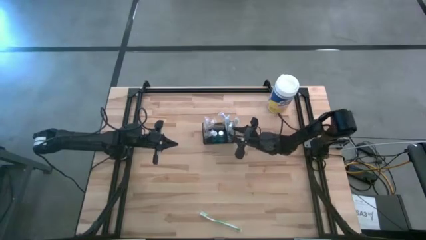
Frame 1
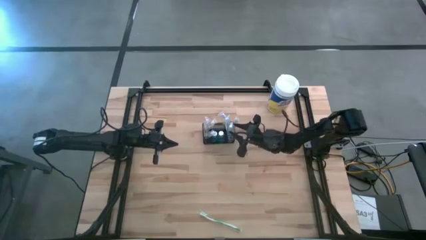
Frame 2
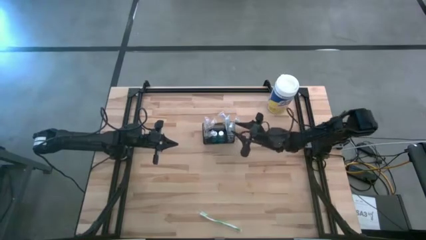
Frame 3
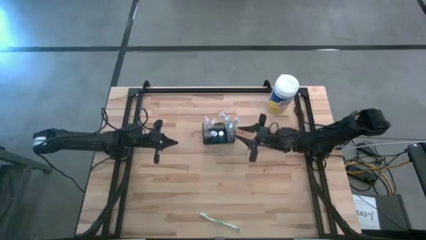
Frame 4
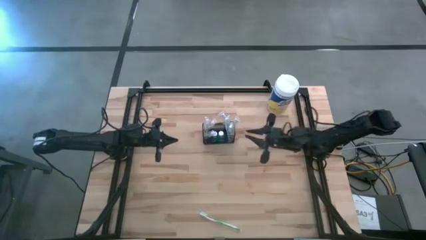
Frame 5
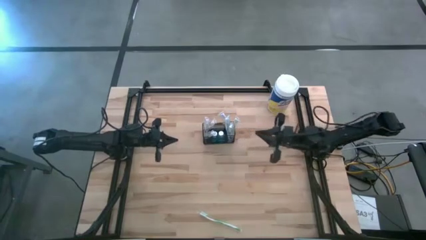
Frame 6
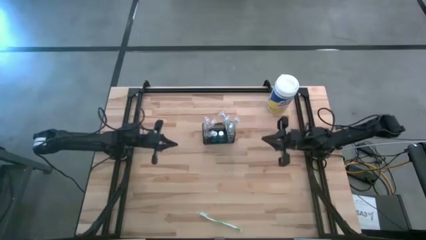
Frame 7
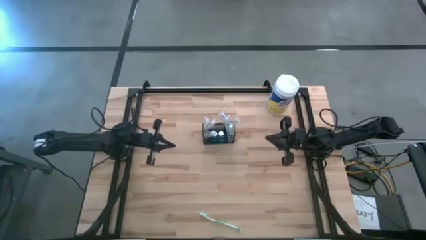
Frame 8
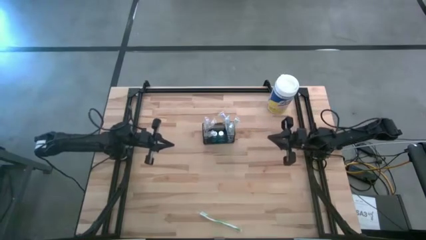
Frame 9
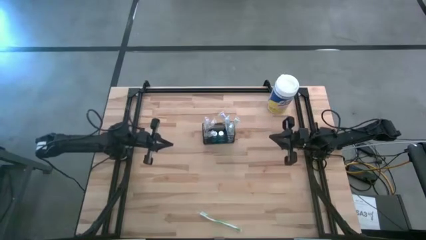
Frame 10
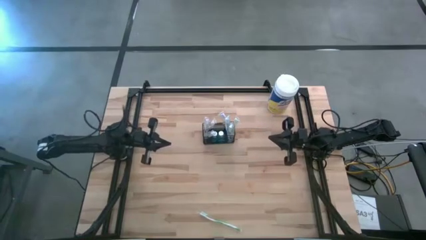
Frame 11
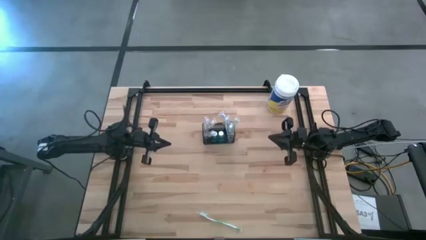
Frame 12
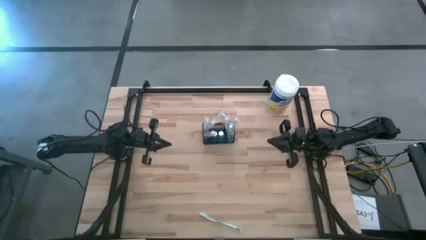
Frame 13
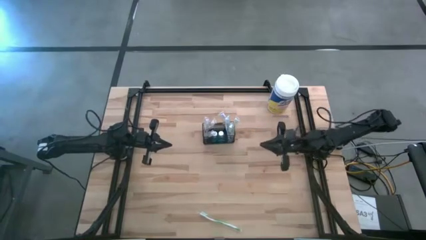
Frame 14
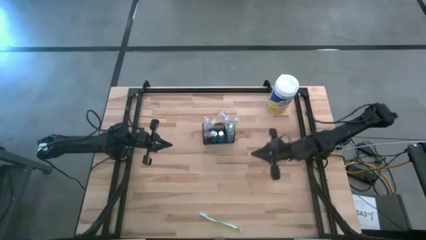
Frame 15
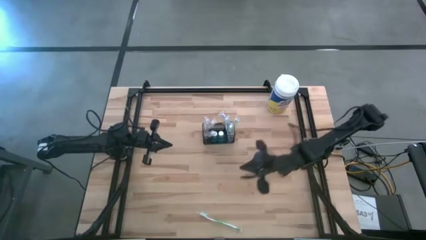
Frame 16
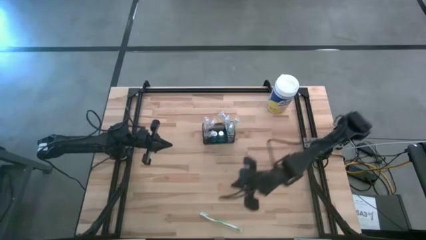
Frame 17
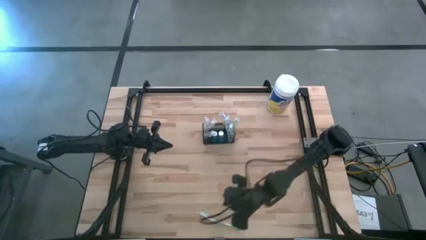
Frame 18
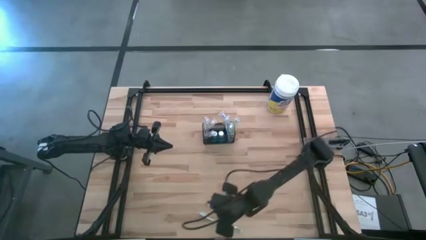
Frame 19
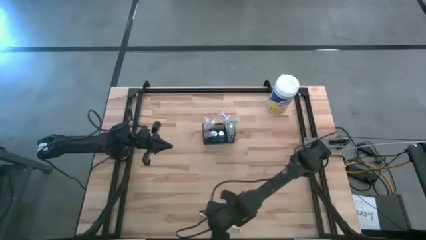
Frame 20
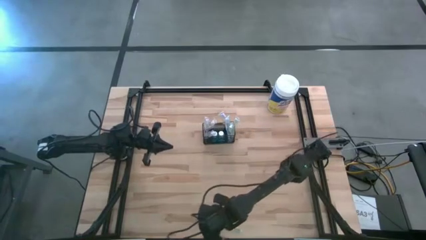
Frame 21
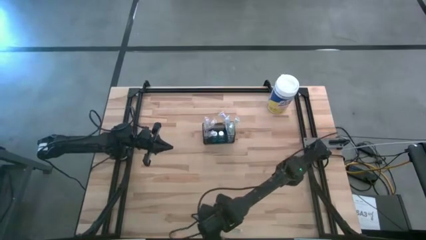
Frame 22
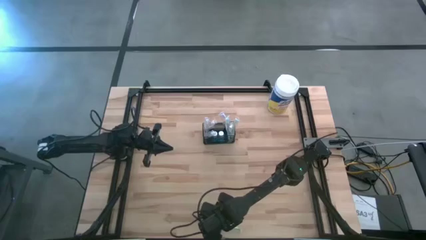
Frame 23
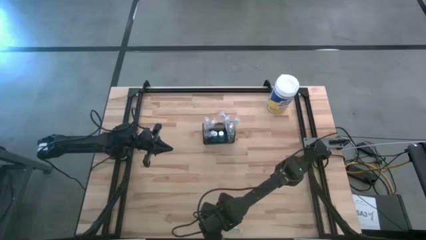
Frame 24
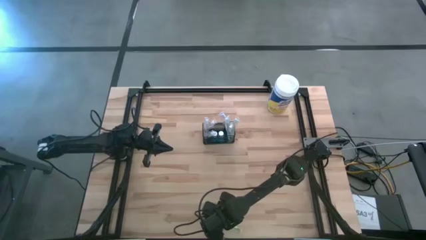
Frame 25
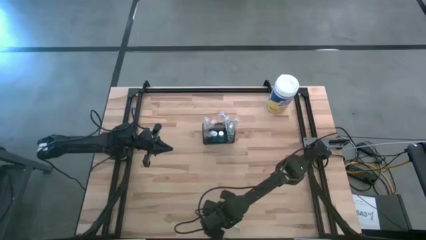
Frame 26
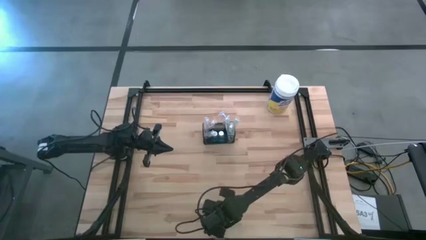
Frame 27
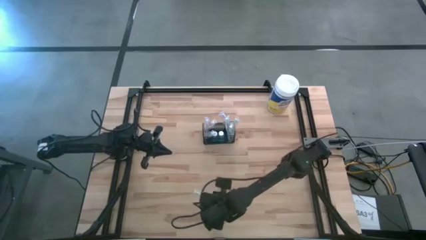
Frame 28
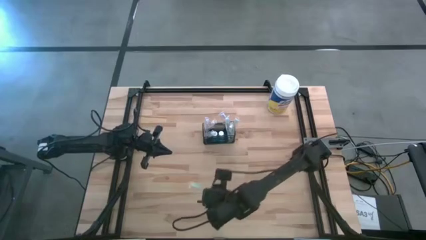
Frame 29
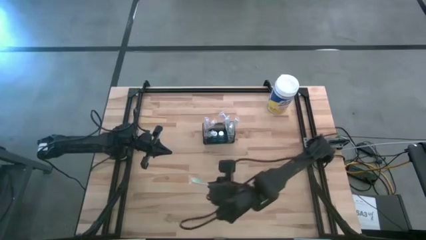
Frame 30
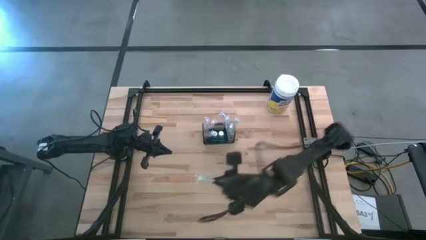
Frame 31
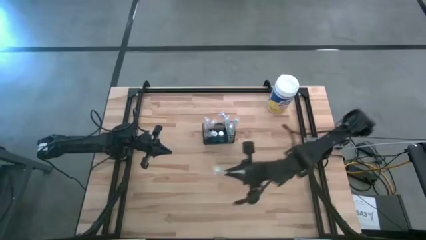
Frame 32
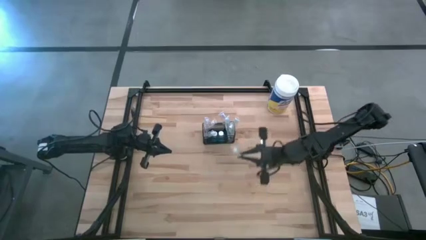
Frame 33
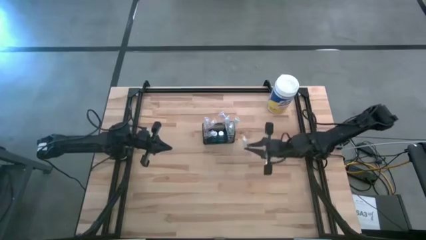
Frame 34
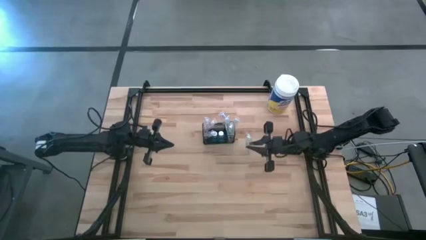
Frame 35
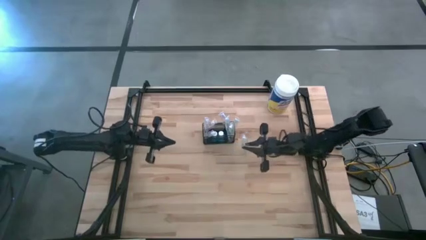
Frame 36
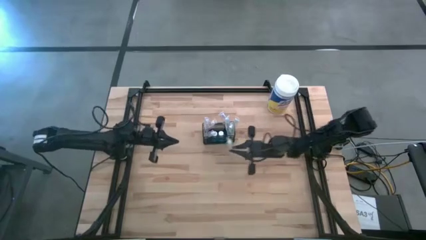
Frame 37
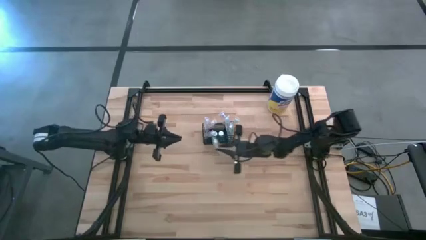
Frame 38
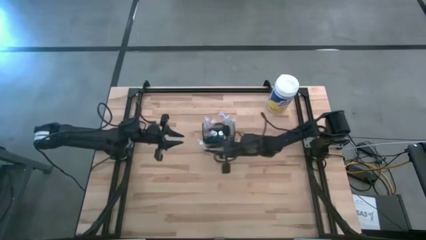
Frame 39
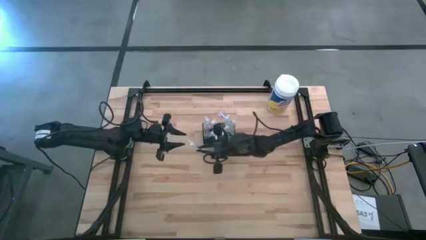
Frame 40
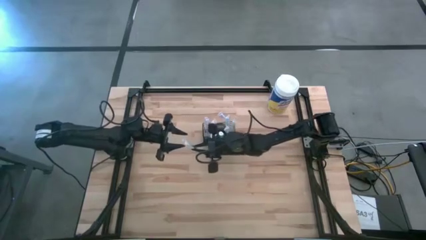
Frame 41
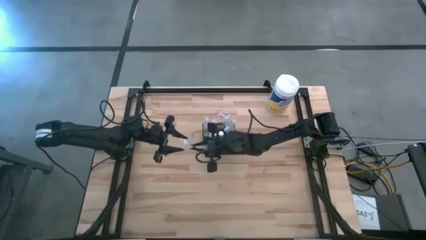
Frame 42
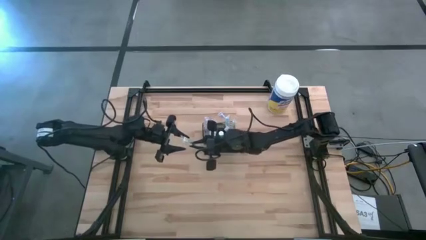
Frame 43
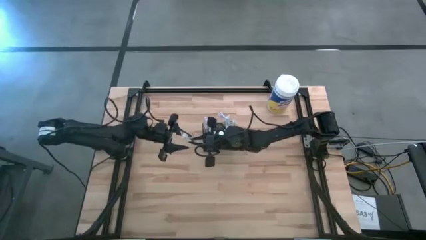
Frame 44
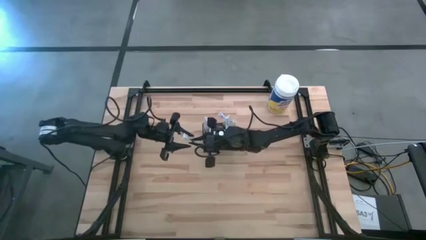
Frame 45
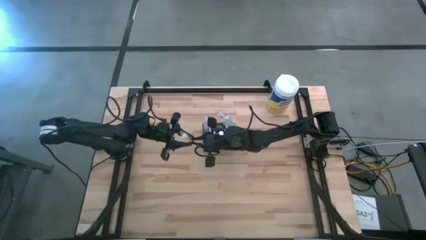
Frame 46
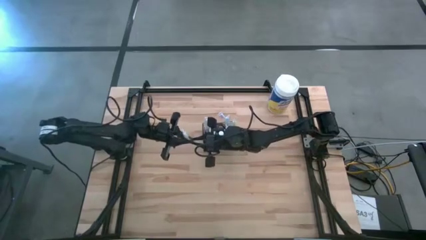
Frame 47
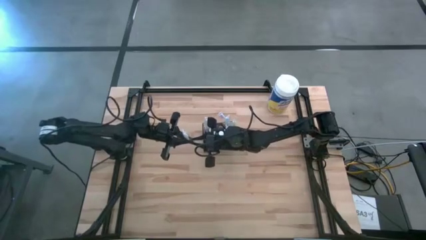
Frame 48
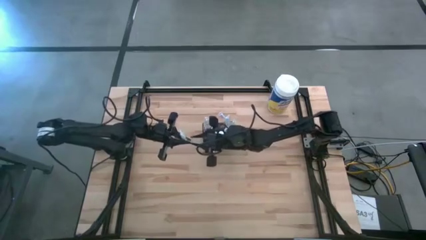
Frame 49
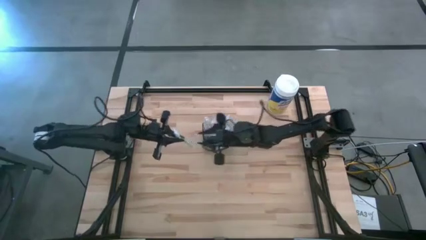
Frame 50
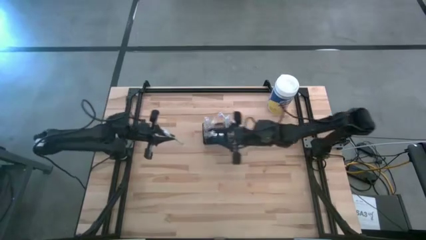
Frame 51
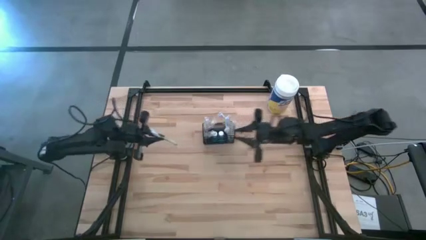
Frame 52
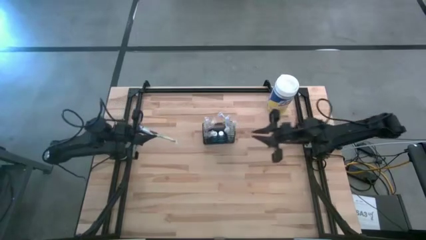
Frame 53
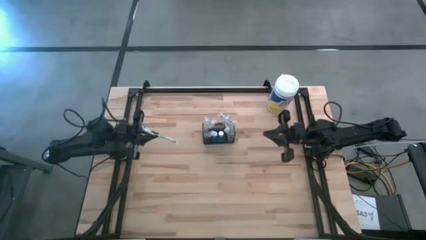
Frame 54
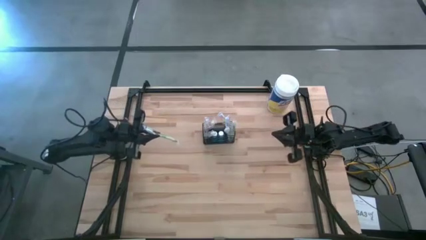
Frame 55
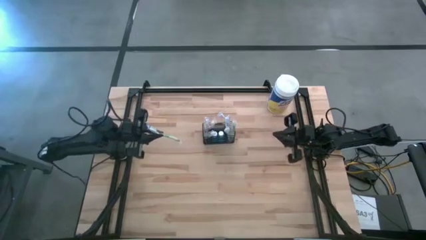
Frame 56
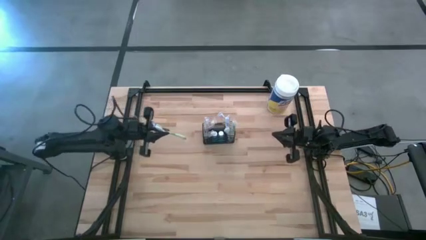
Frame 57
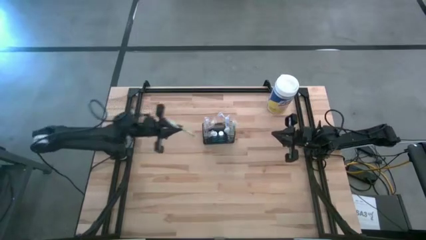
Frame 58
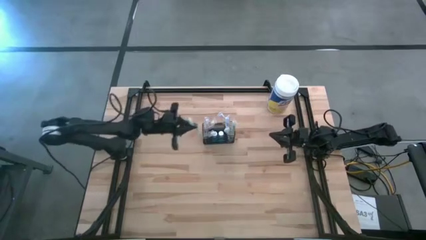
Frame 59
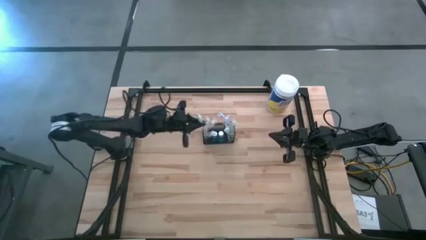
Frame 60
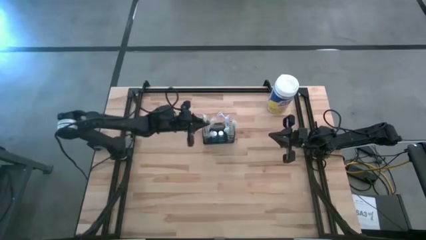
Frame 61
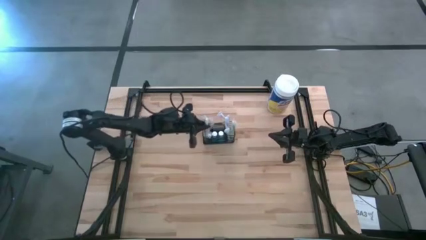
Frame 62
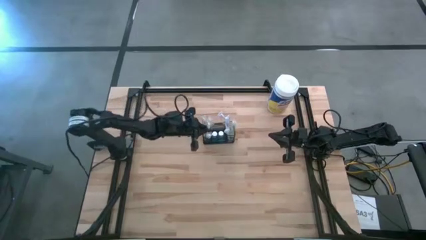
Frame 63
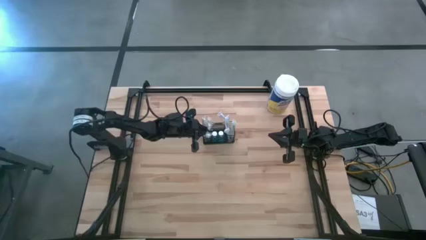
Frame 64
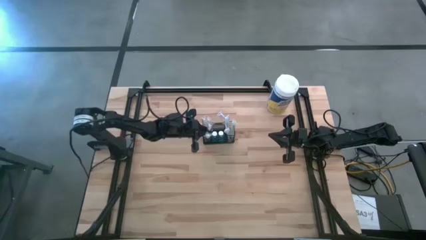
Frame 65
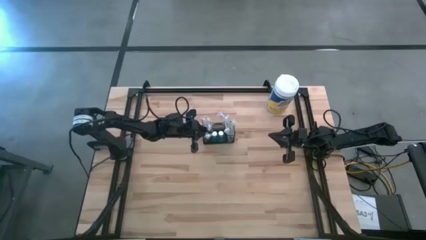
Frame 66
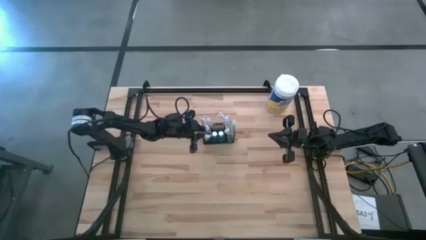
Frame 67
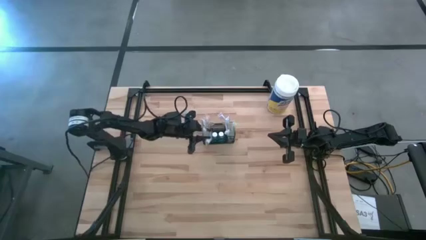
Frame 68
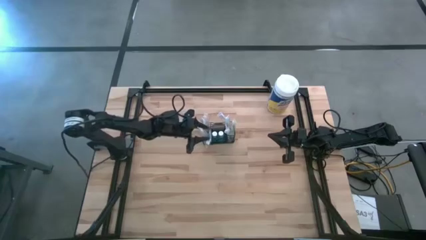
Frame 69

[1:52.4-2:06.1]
Task: Pick & Place toothbrushing station
Put the green toothbrush into the mesh organizer

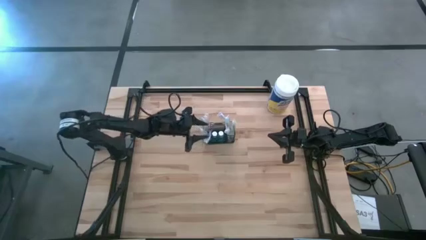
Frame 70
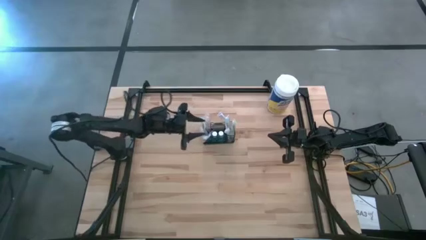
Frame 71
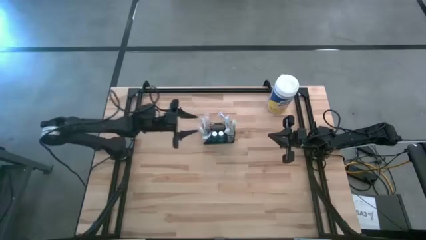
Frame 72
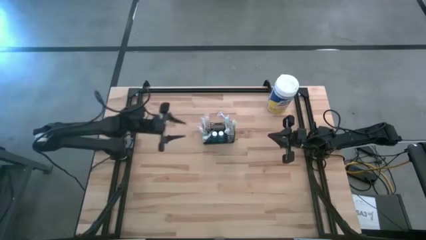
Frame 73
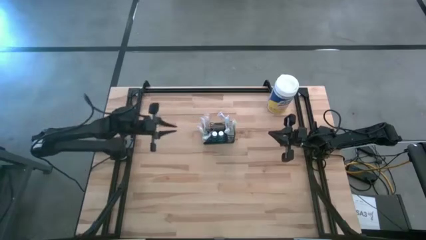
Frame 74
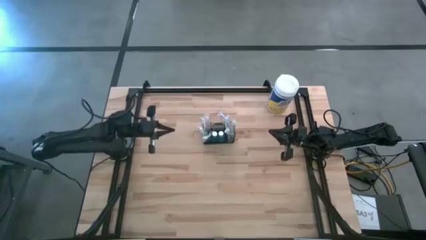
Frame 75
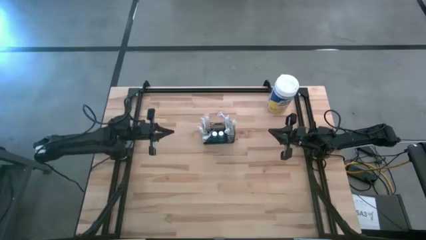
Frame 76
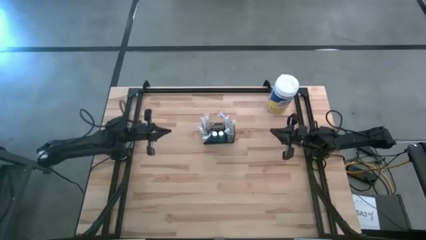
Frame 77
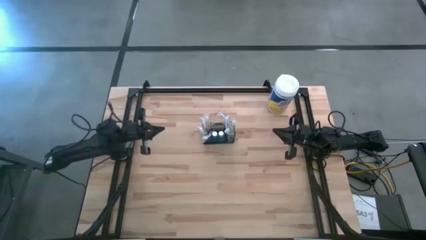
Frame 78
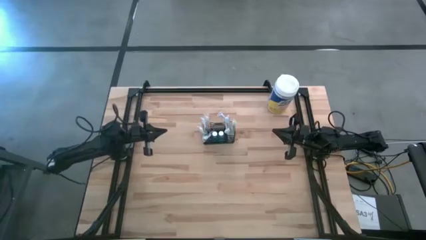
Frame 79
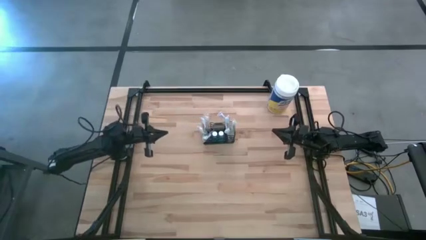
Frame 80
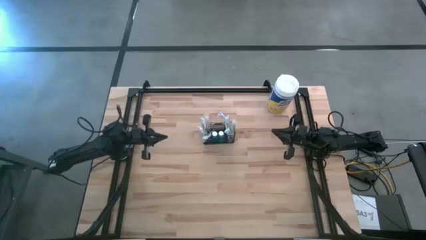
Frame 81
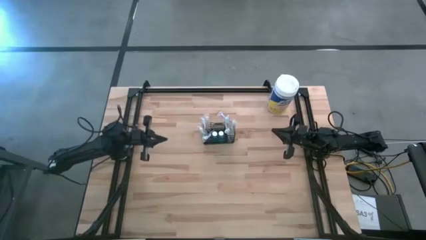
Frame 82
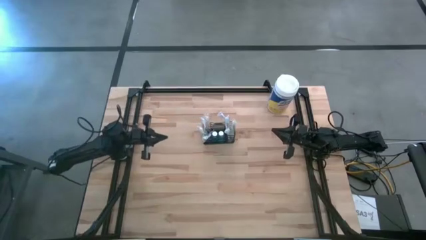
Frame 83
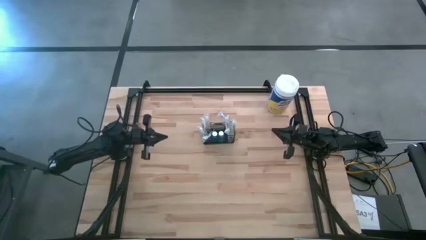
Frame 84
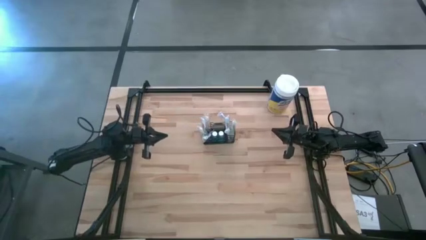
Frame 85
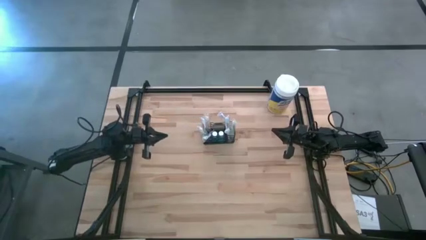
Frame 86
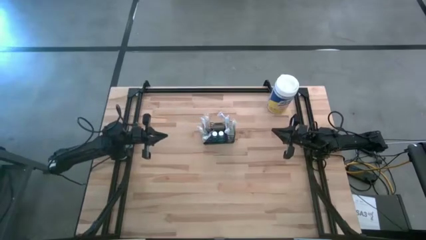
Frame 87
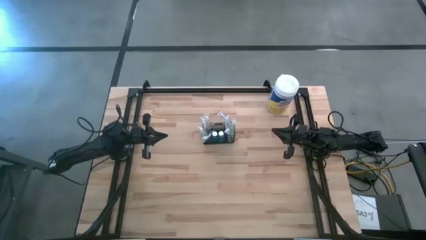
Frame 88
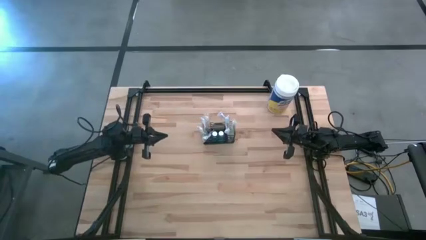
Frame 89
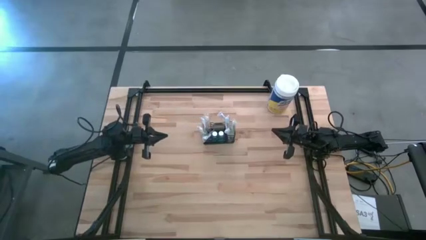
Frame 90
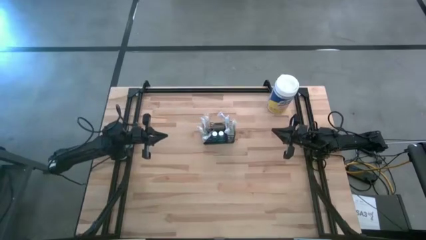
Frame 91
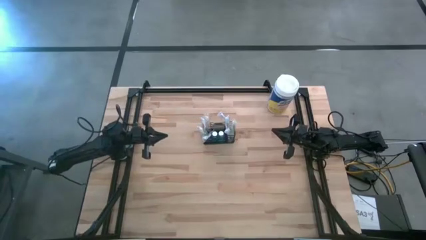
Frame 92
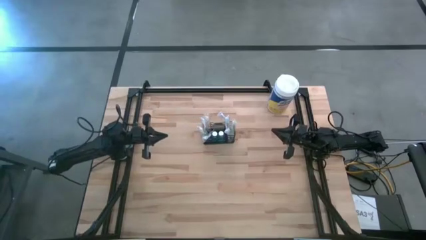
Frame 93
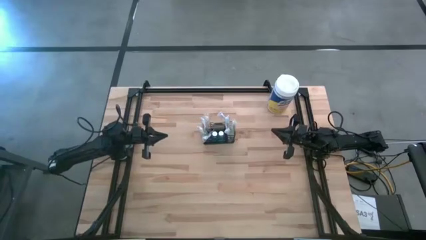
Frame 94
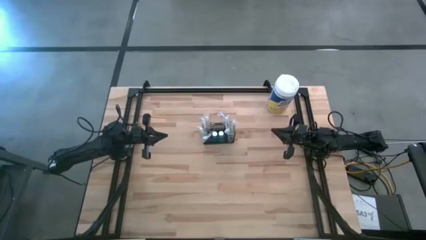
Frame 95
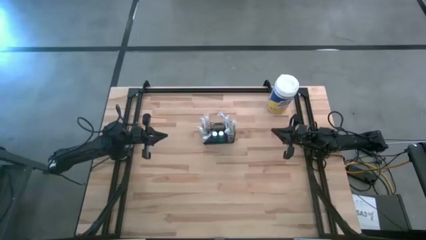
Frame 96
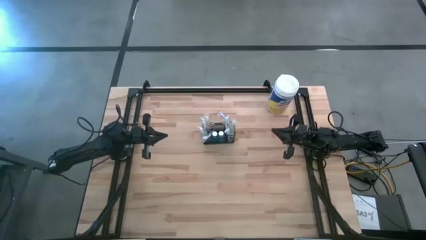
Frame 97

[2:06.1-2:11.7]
Return to Home Position
